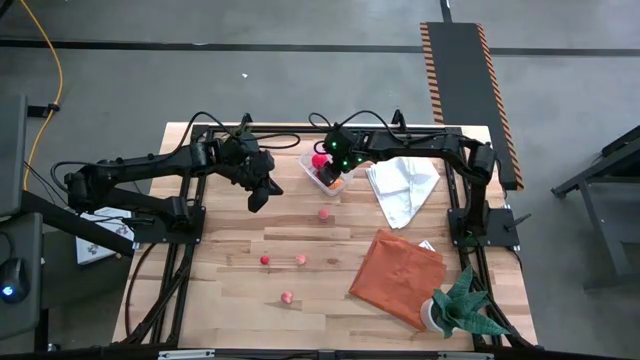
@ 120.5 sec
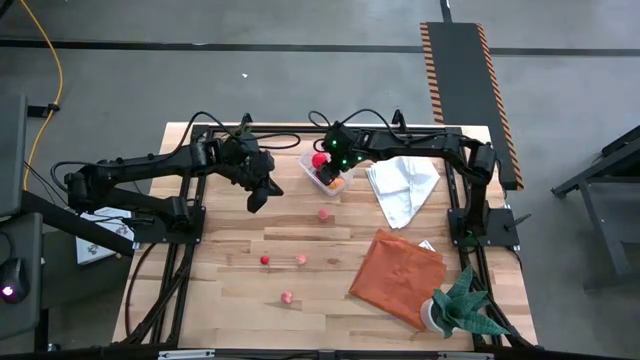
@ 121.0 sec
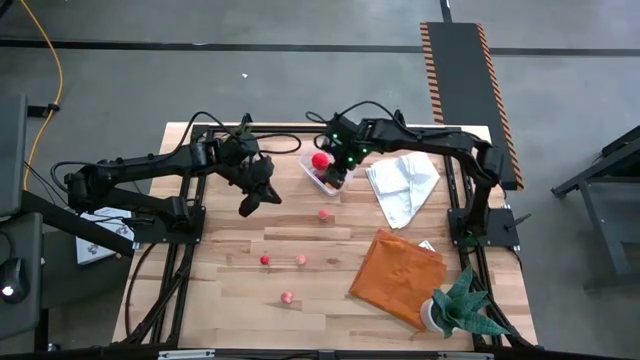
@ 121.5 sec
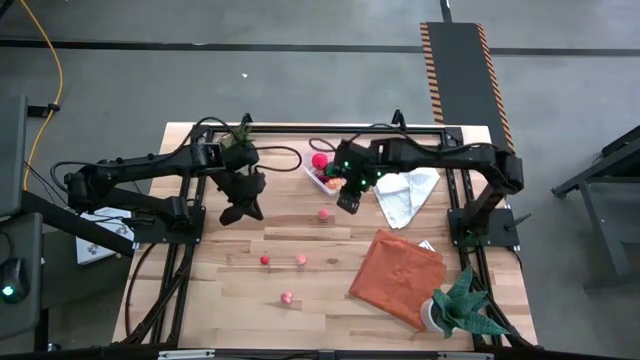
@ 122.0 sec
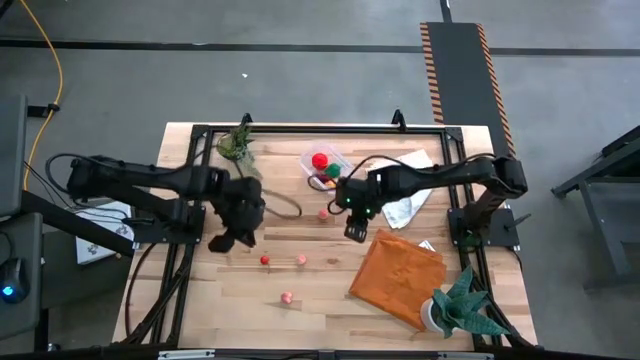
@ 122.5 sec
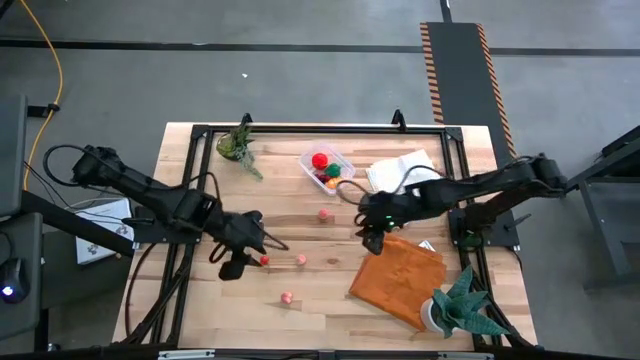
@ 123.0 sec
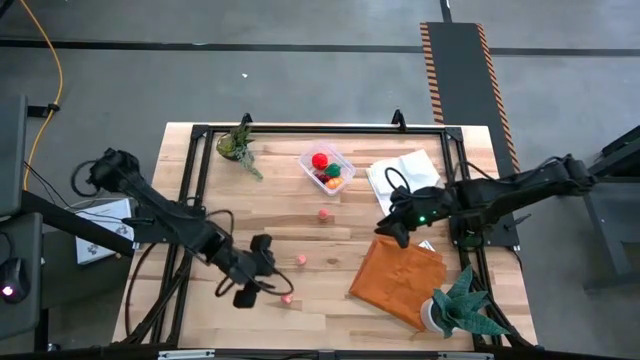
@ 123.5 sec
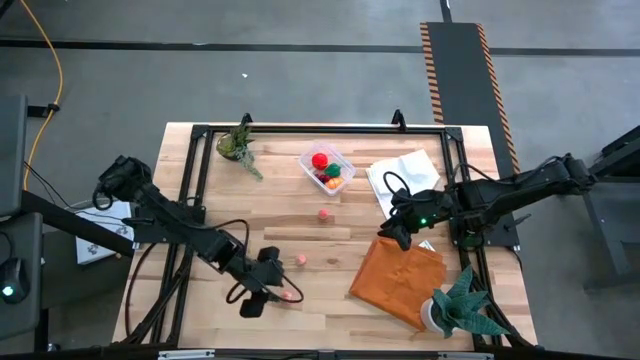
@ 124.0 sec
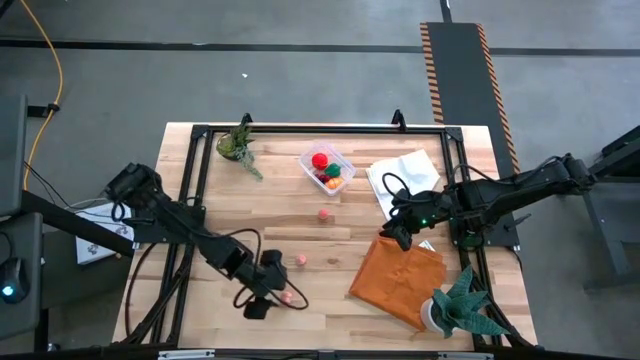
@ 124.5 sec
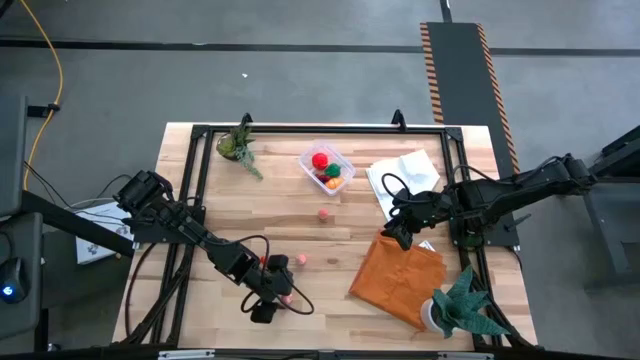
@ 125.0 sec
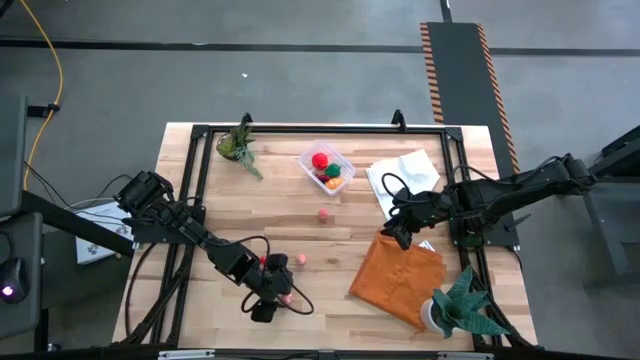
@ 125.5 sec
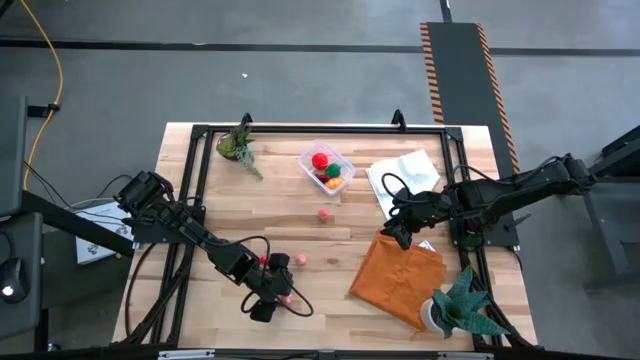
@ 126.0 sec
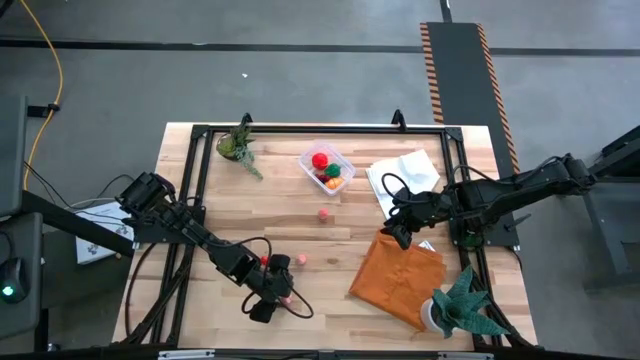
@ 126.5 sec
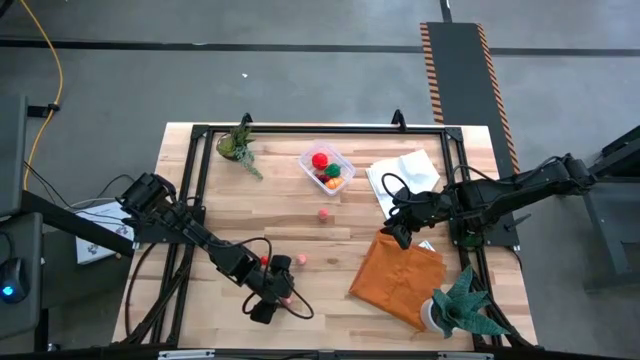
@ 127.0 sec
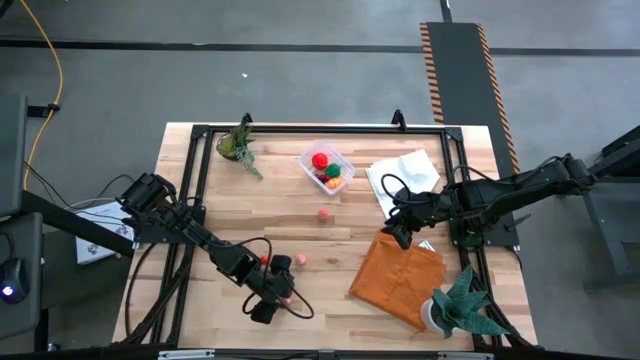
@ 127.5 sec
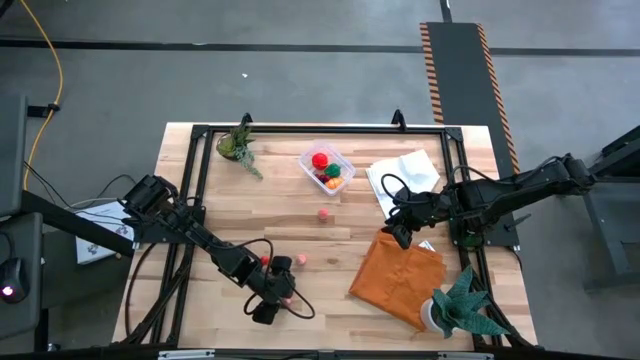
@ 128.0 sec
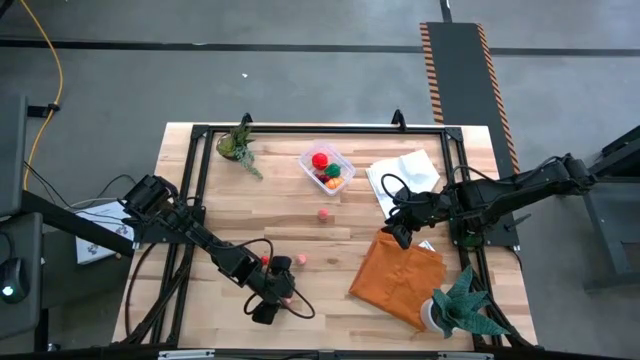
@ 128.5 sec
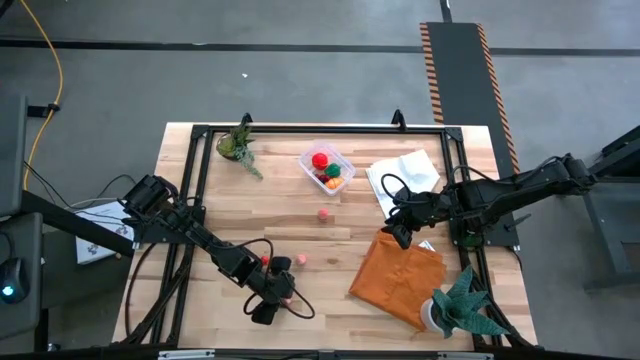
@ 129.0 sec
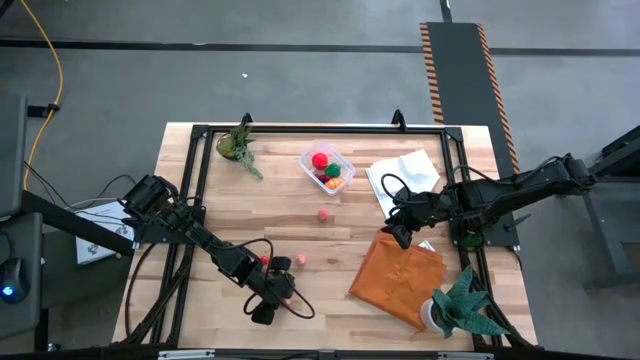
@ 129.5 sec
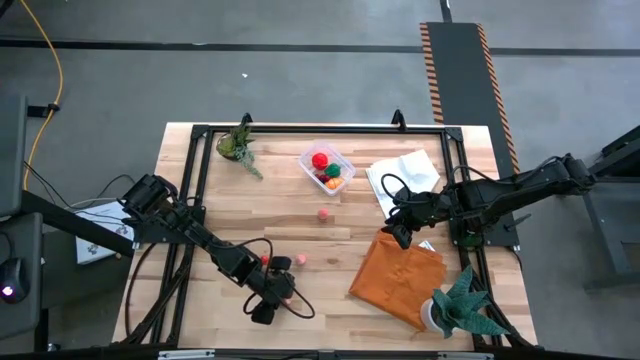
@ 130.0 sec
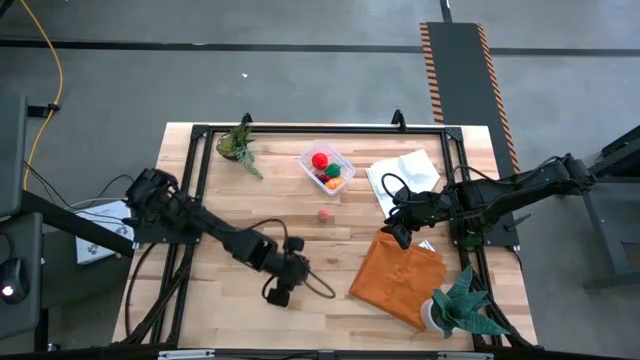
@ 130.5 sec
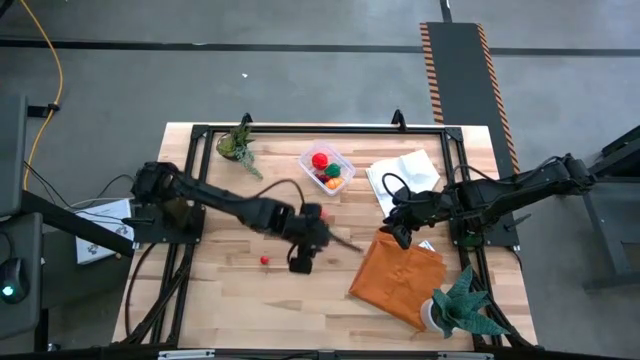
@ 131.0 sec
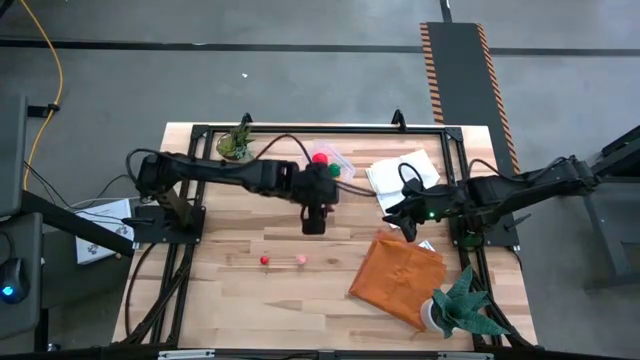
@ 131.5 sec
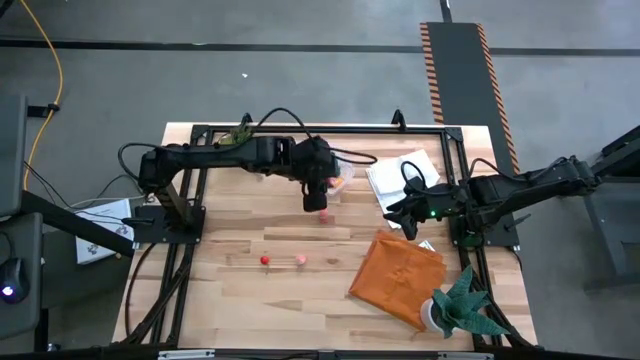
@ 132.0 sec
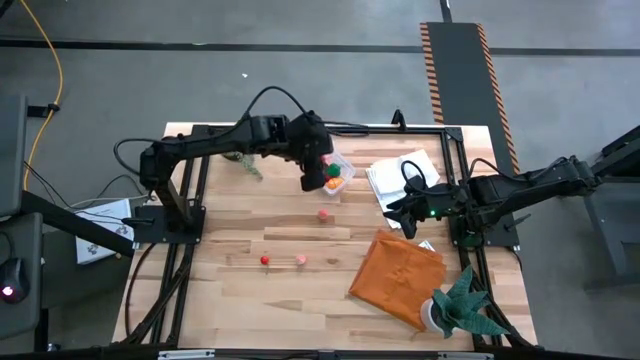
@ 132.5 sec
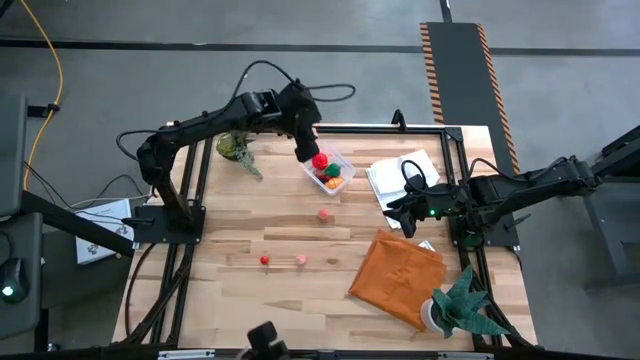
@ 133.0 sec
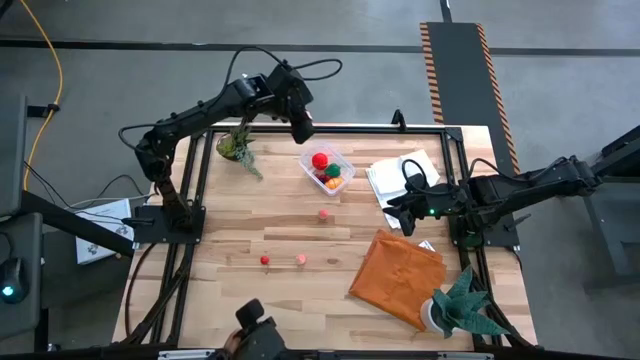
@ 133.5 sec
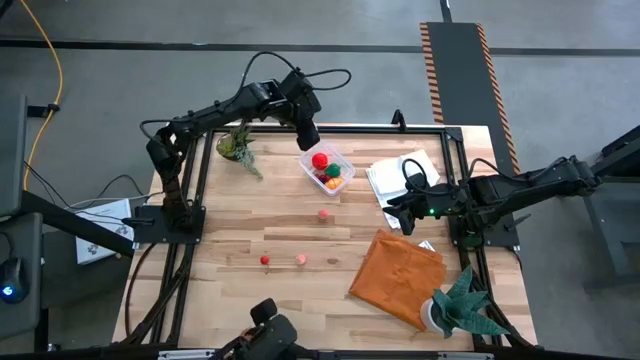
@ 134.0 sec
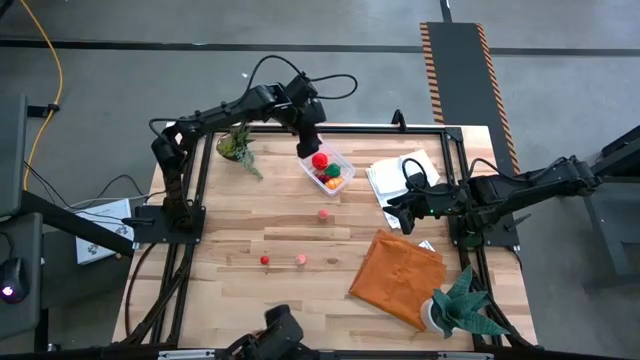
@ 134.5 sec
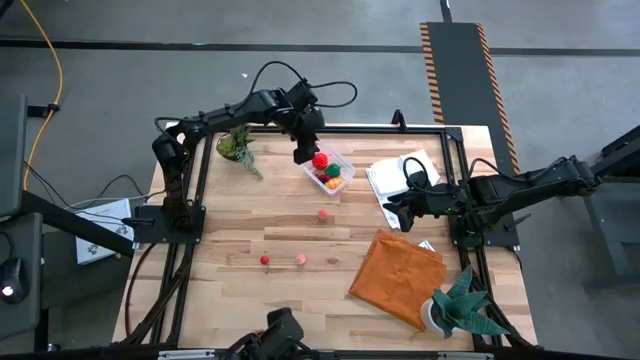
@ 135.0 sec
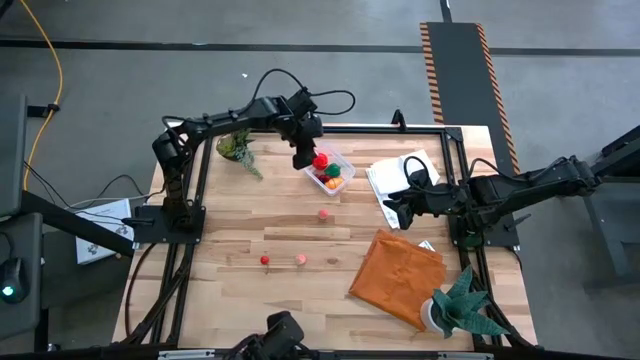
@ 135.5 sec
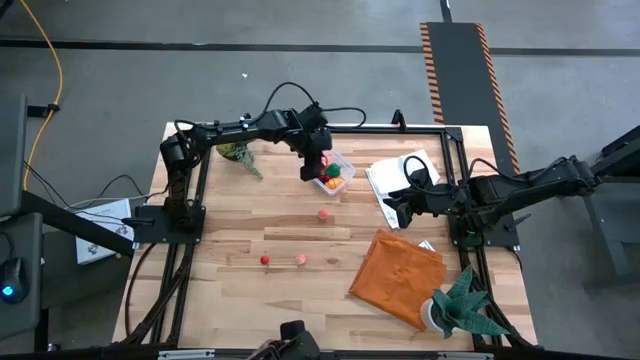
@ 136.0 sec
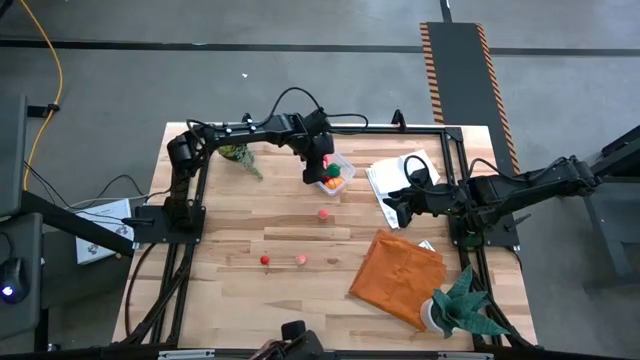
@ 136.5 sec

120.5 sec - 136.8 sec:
Task: Pick and placing Produce into tupperware
Put the bottom pink peach into the transparent bin

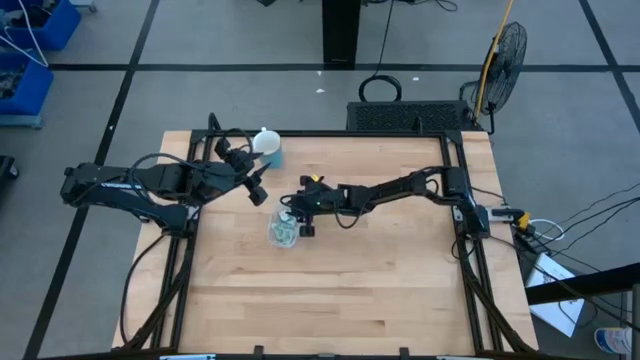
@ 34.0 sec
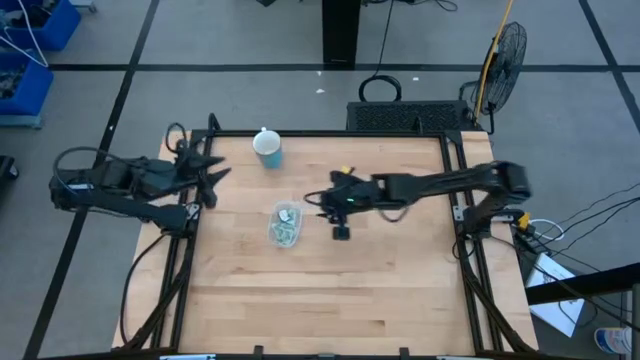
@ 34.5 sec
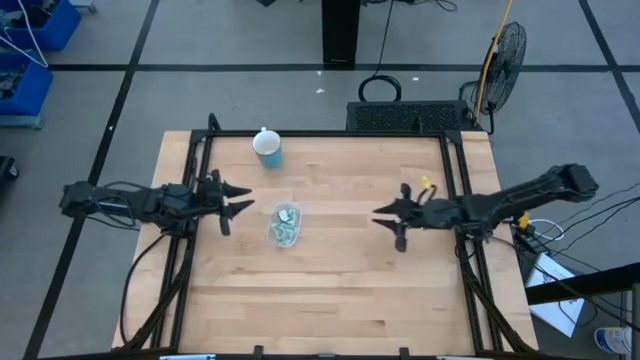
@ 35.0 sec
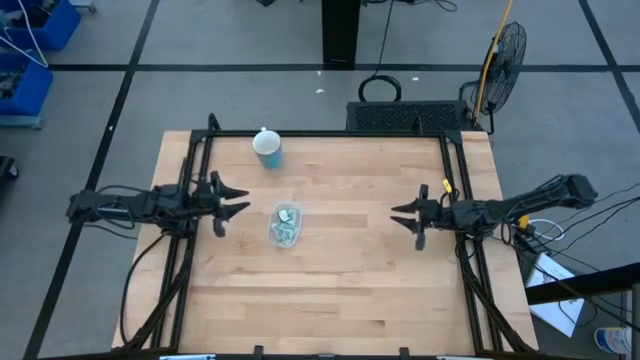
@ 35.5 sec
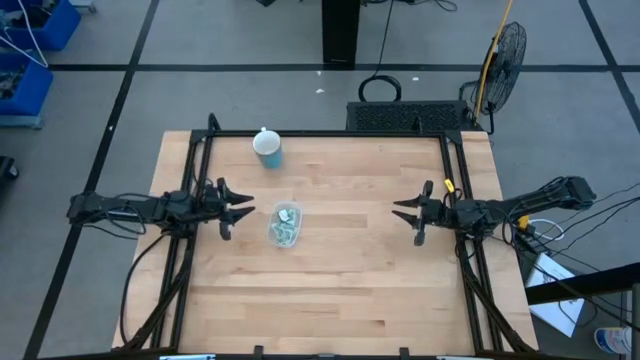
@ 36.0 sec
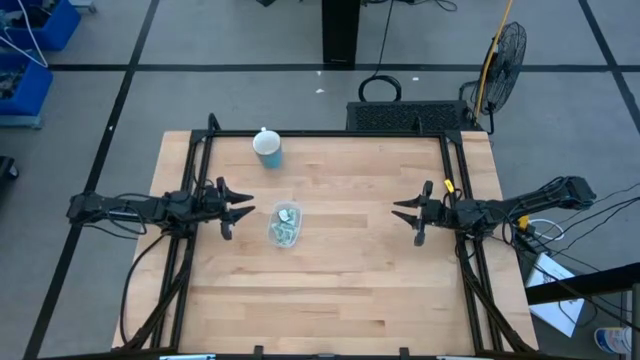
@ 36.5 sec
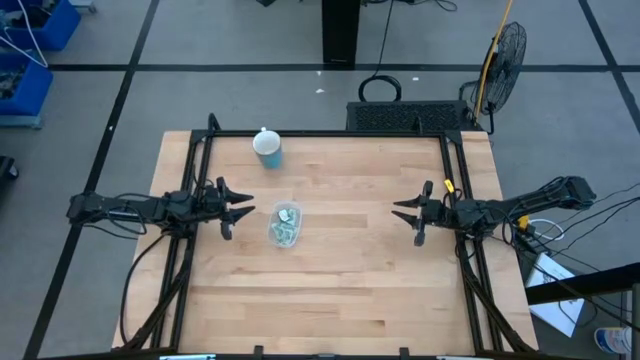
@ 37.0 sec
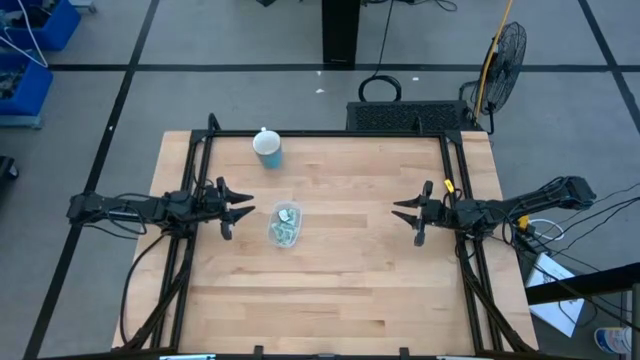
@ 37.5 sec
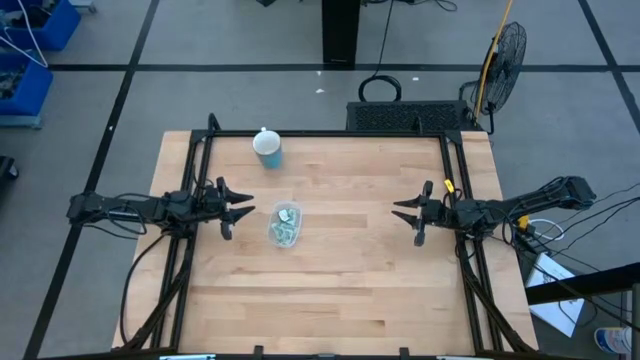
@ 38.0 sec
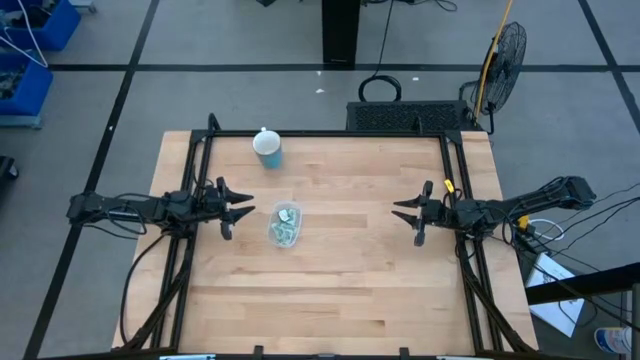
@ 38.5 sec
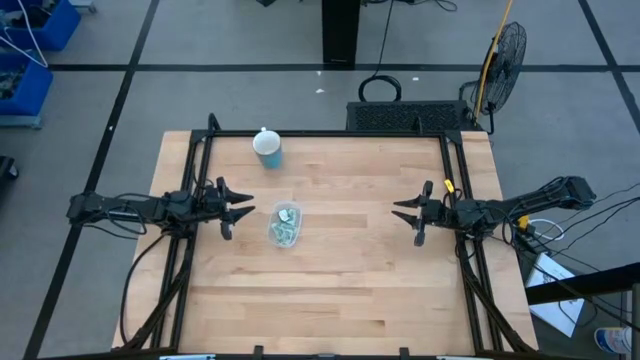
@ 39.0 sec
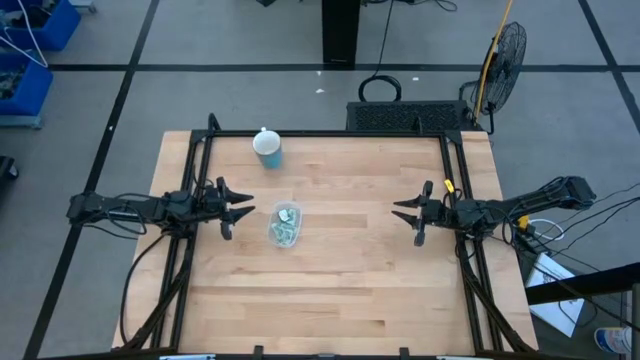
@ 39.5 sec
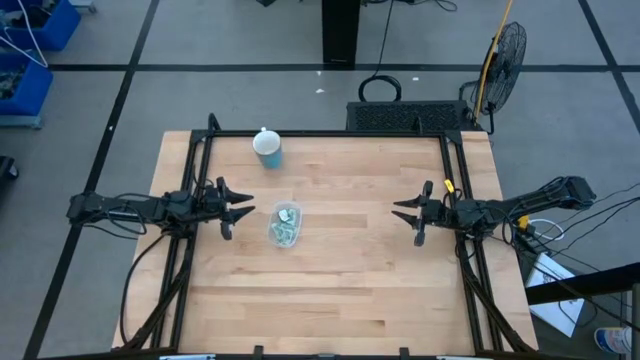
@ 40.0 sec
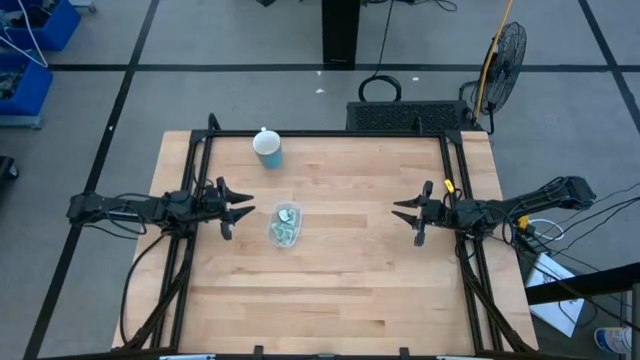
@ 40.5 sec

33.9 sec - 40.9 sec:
Task: Pick and place Stevia / Truvia into bins
Return to Home Position
